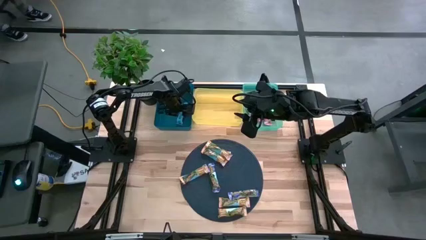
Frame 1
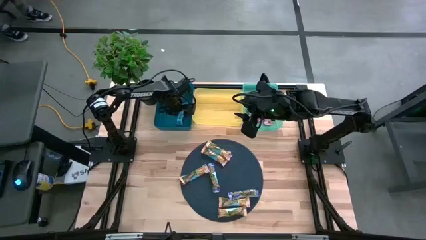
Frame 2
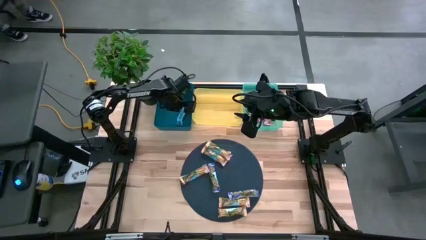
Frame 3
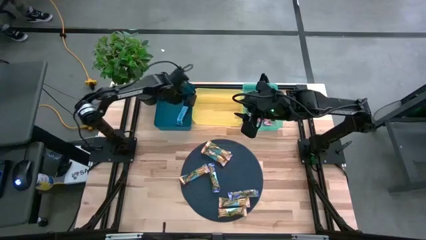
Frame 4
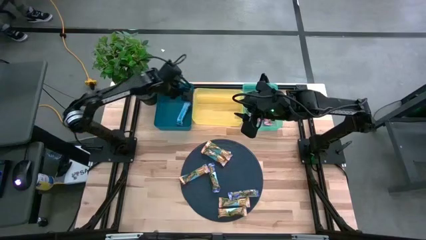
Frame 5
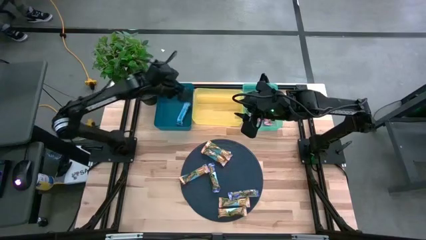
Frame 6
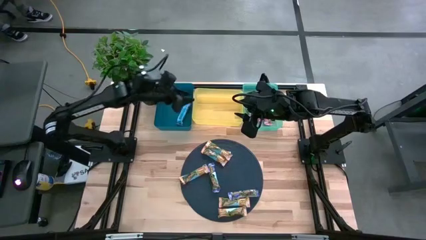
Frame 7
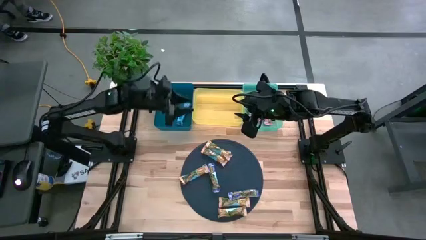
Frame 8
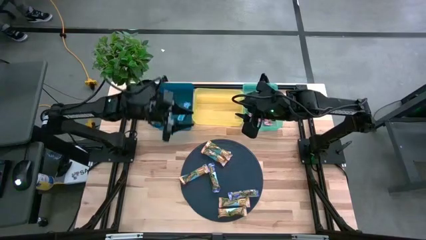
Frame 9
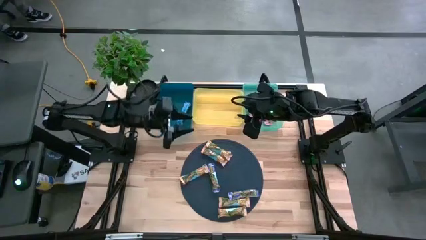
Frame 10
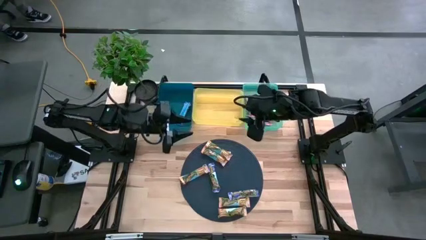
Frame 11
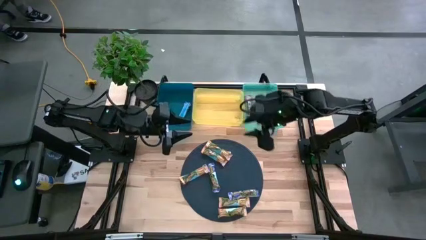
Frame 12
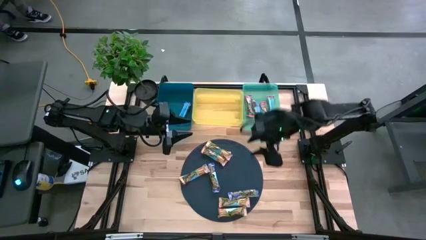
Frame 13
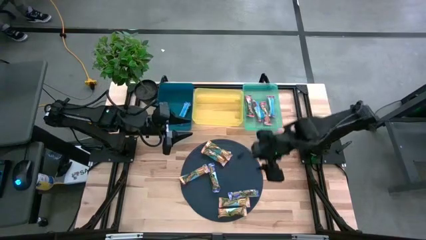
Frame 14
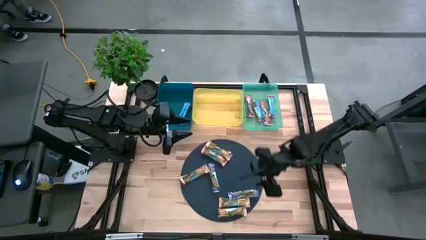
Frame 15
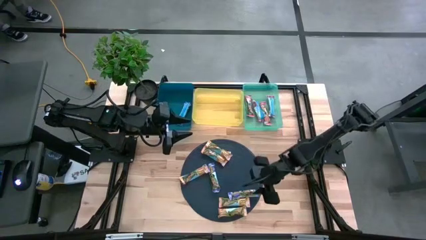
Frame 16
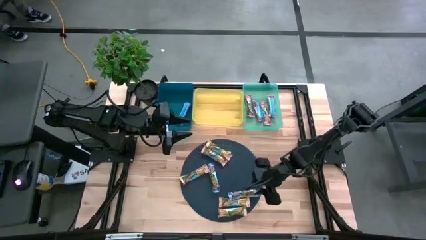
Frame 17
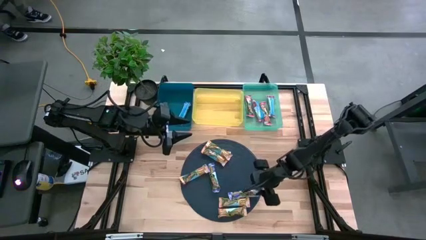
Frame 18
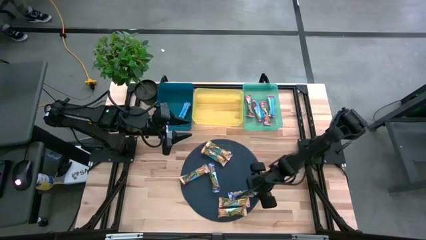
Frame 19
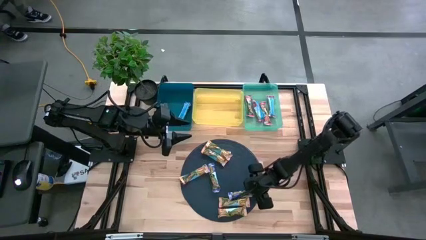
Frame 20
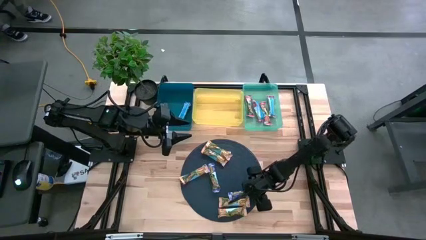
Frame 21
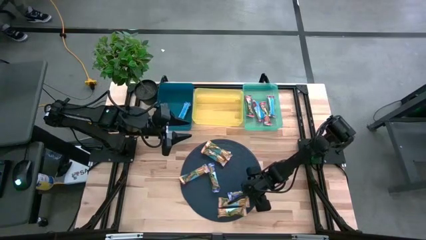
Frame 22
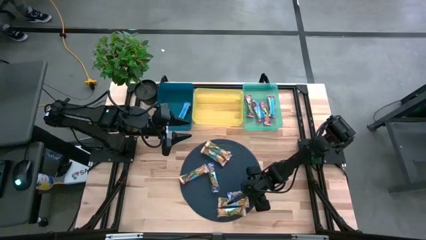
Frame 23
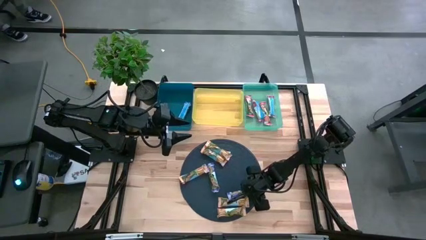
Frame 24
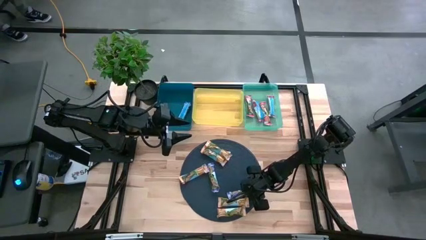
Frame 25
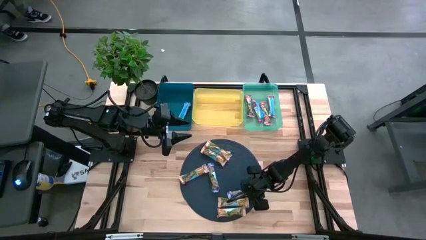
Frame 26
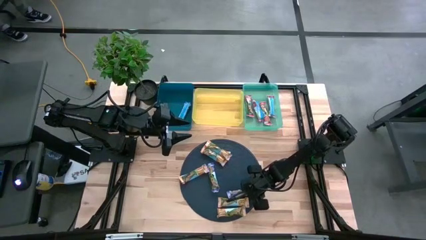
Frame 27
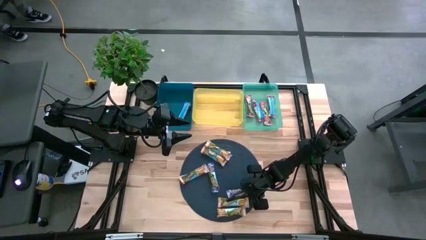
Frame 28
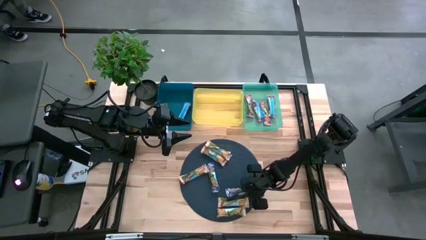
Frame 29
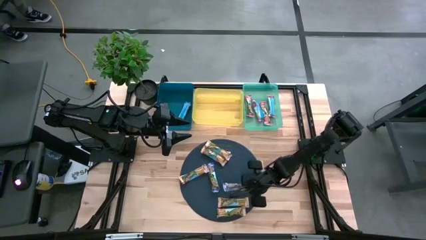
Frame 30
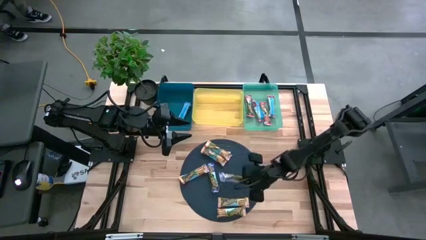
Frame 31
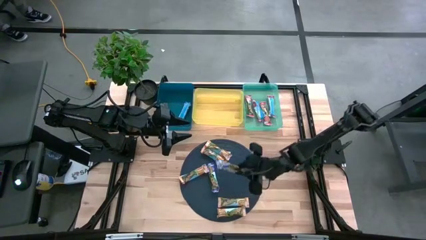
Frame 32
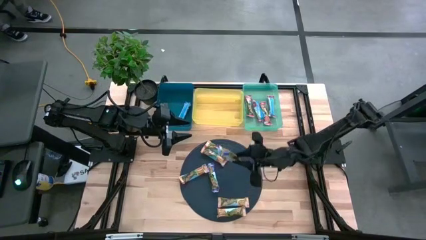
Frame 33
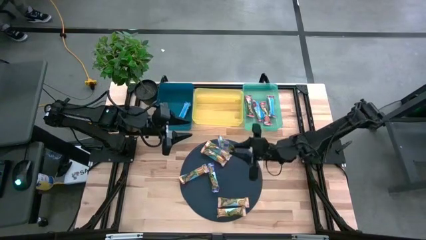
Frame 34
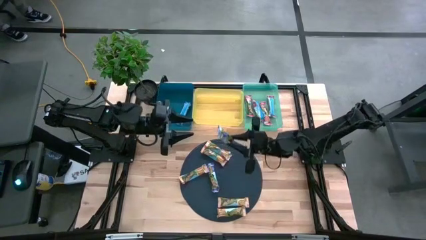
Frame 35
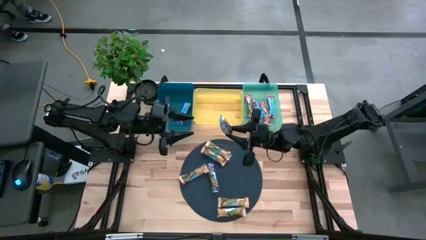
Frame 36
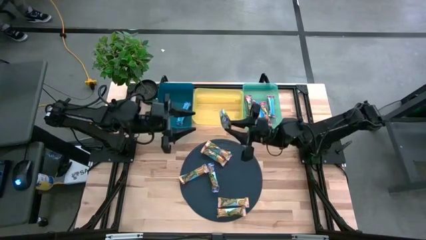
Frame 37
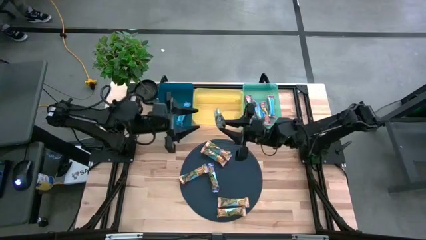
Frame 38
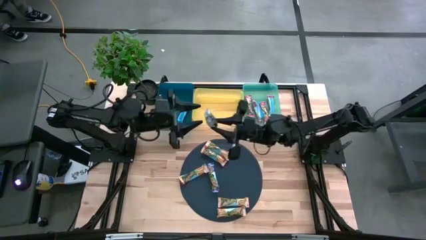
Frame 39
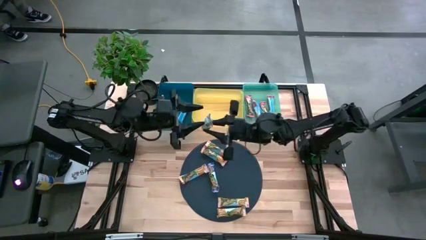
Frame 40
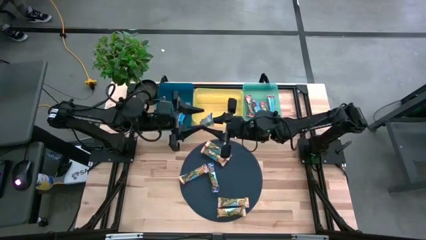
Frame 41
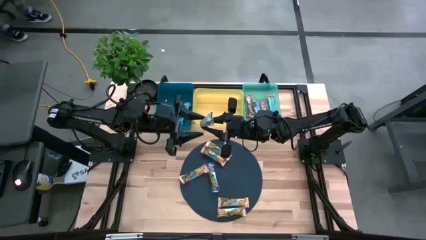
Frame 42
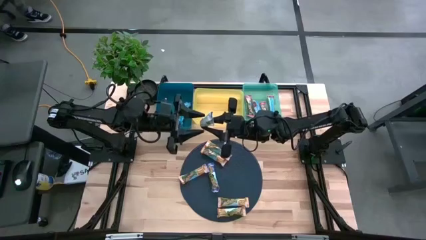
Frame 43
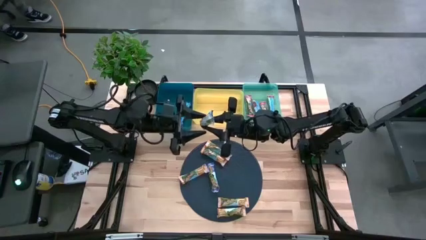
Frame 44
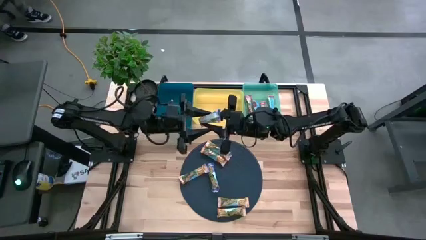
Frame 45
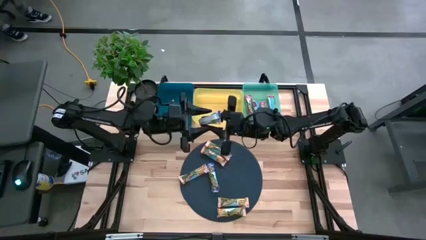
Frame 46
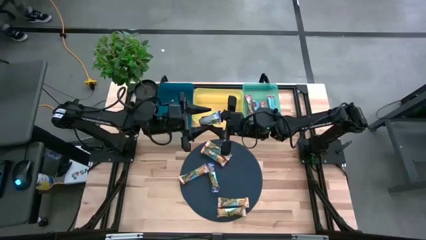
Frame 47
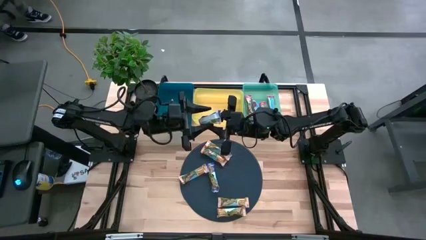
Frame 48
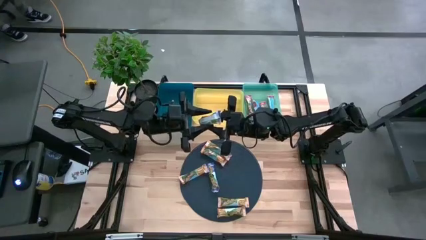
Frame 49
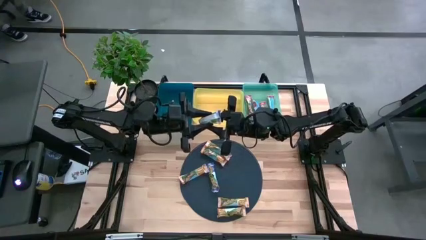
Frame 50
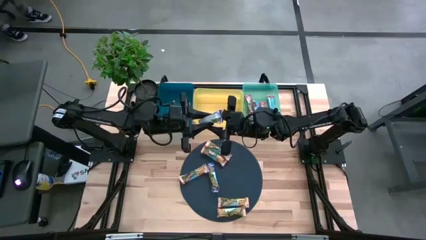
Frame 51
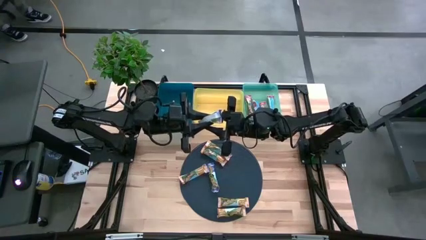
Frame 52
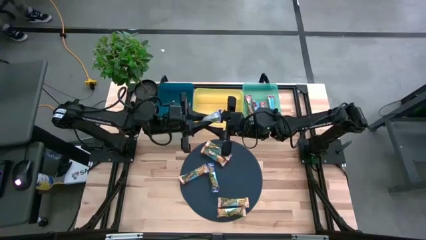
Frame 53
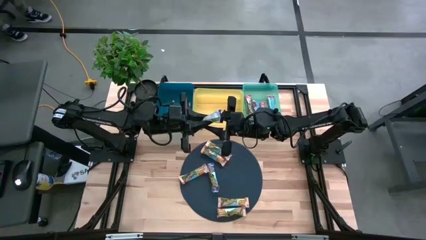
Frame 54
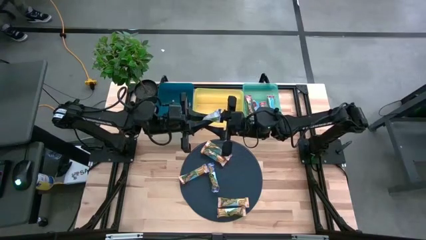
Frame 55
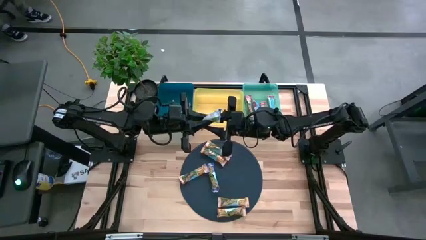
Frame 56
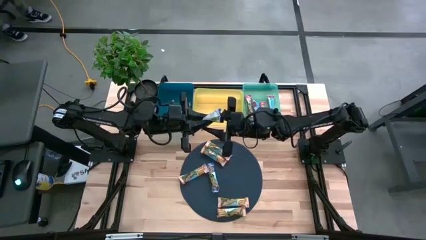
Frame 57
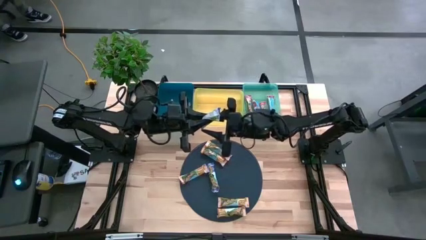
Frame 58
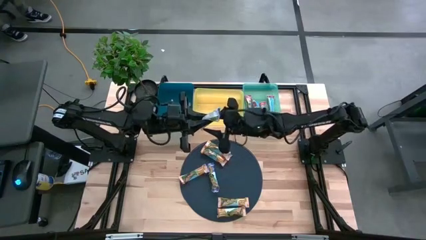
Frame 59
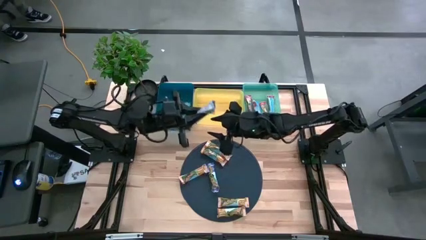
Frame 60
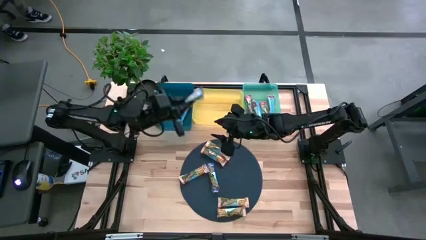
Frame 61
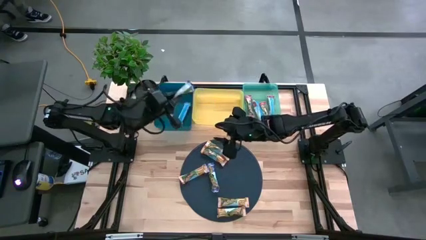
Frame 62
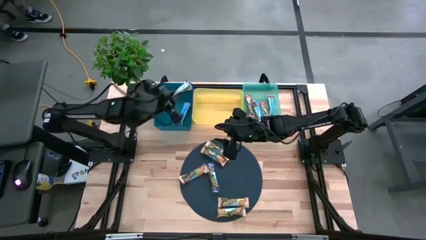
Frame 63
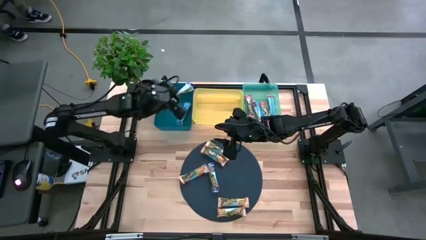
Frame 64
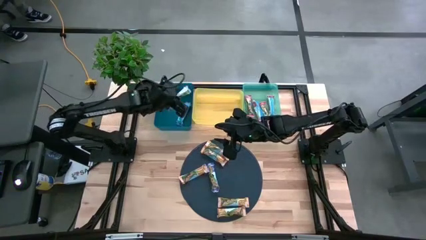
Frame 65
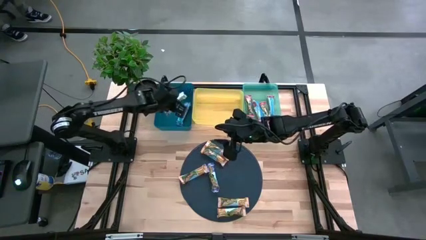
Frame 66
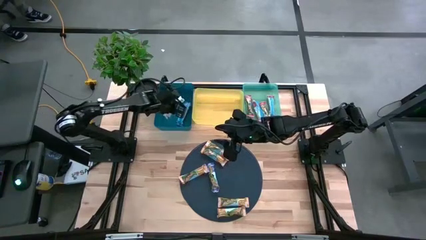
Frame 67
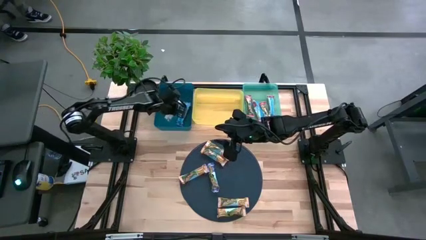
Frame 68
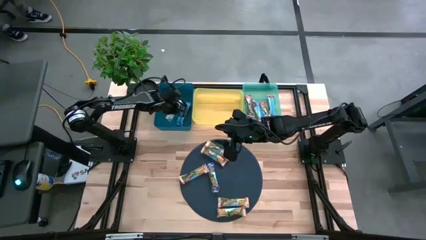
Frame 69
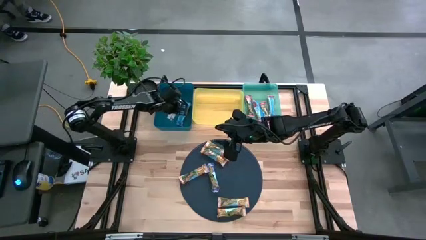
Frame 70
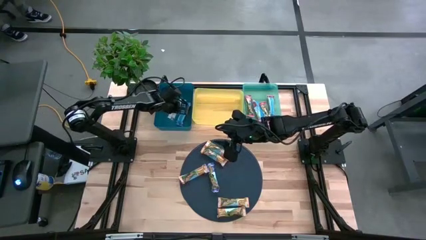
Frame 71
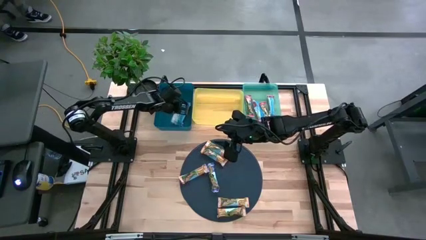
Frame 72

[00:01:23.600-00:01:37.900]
Task: Pick and place Granola Bars by type
Put the blue granola bar into the blue bin
